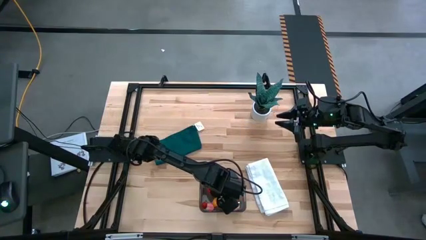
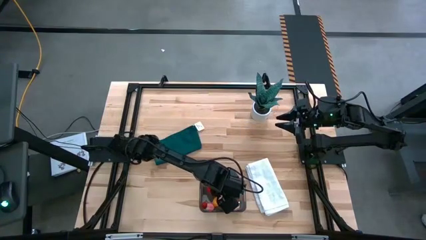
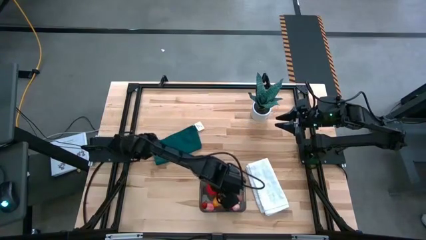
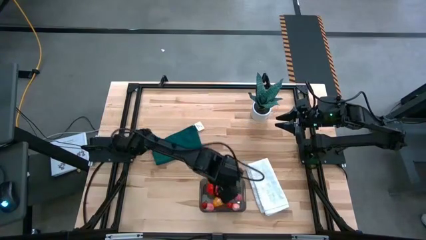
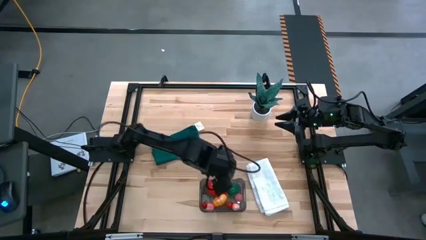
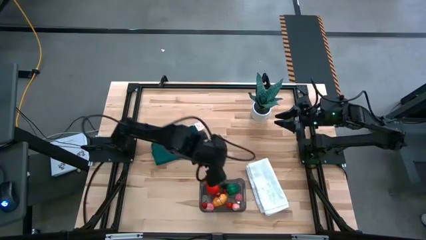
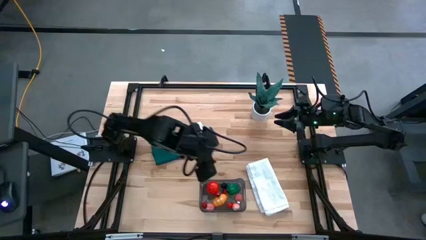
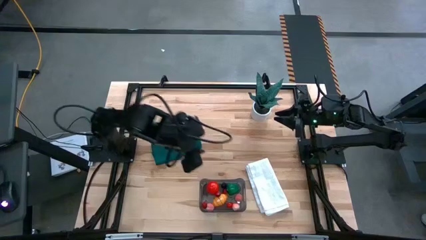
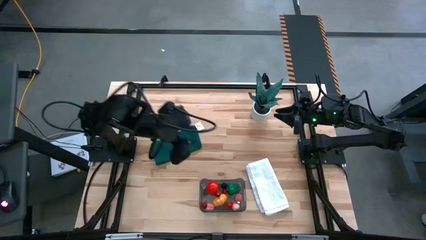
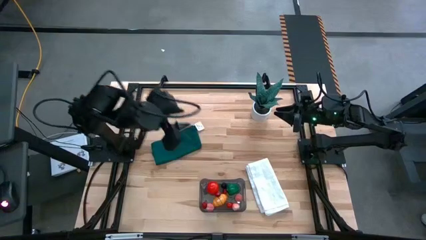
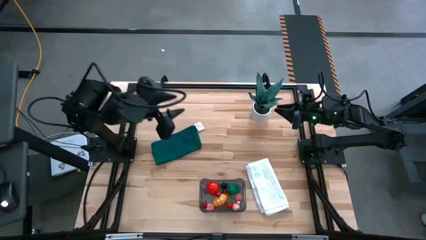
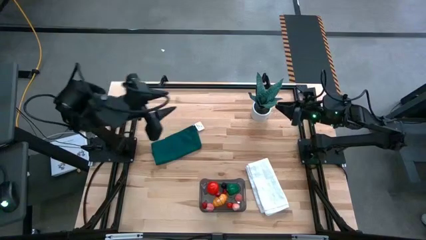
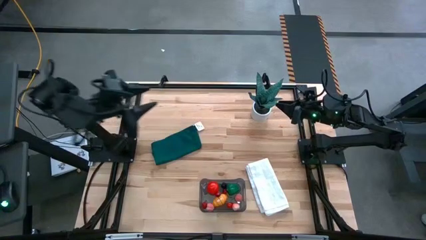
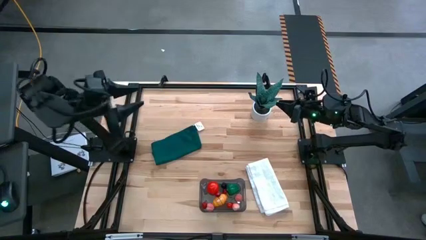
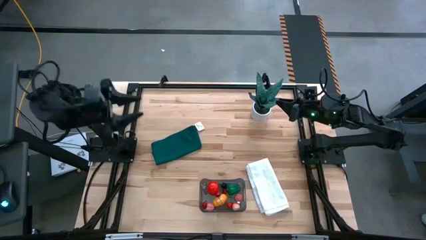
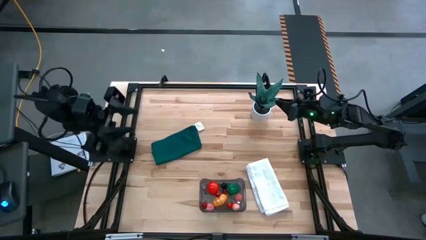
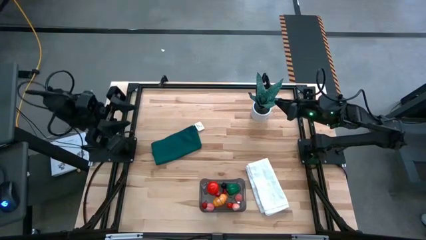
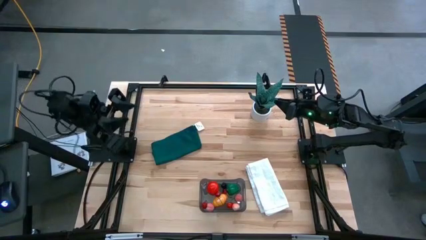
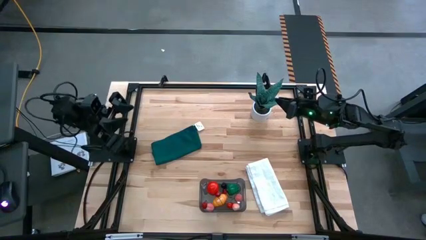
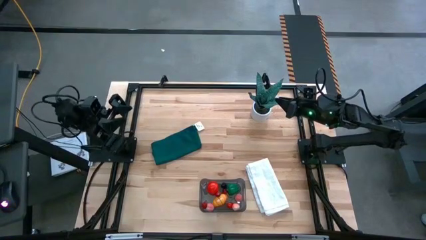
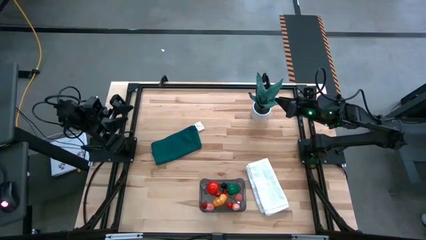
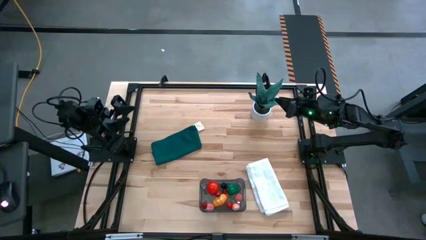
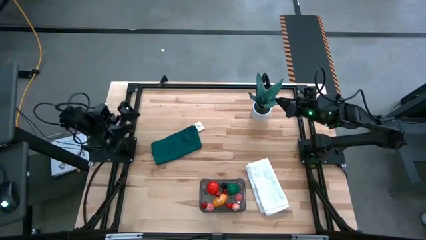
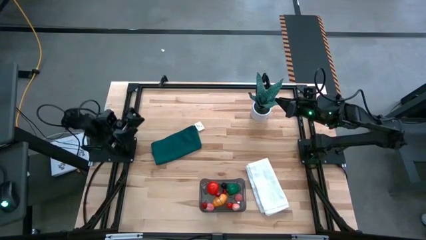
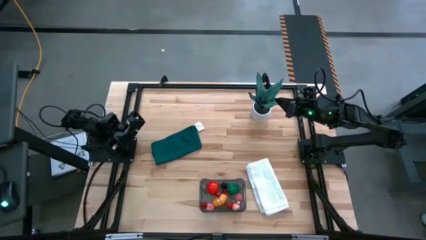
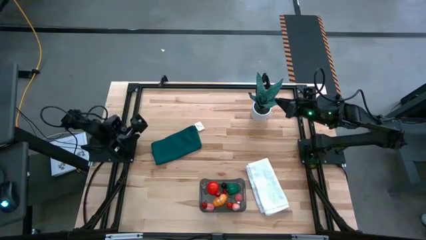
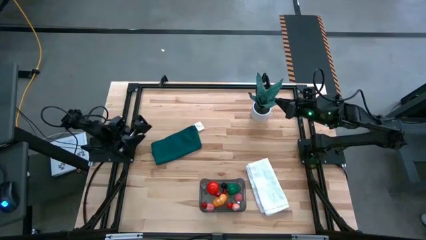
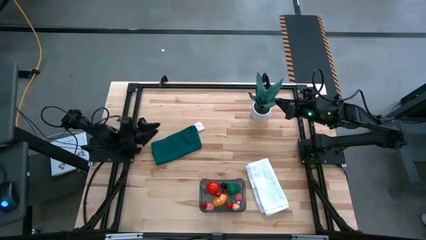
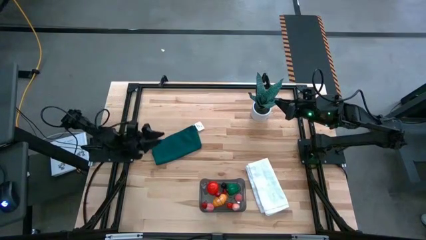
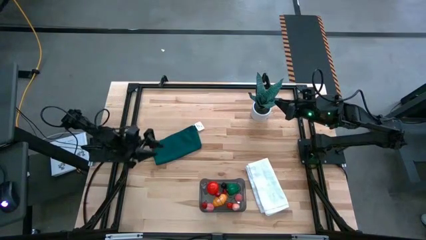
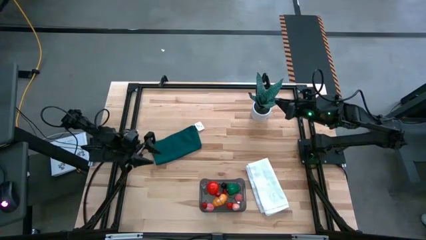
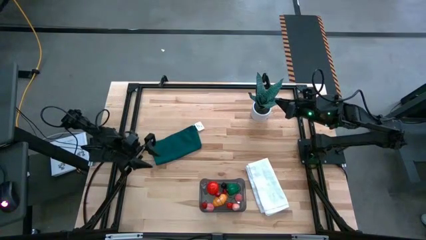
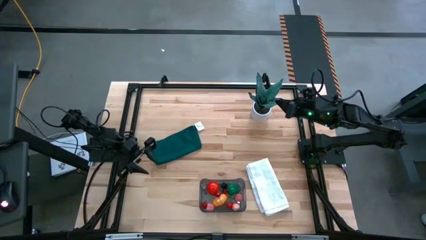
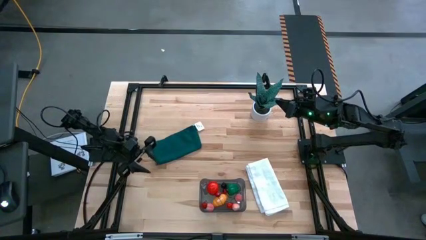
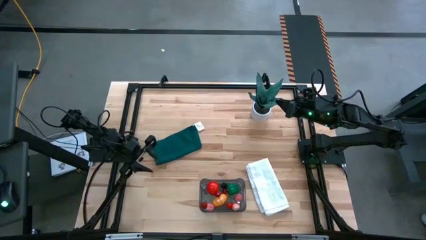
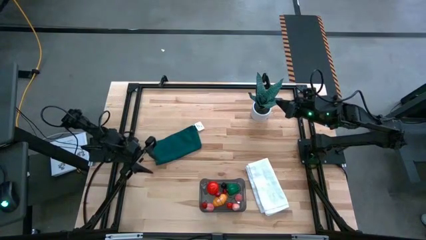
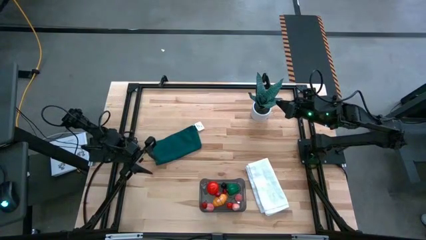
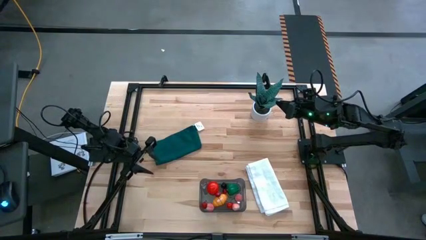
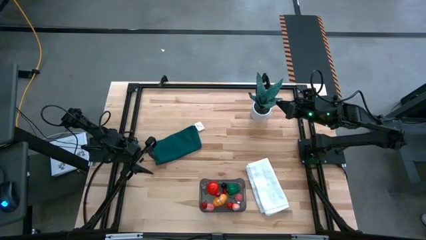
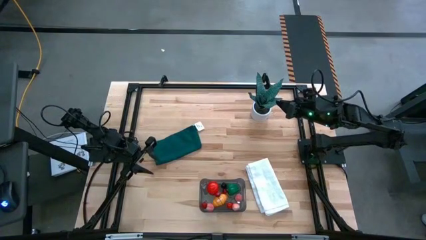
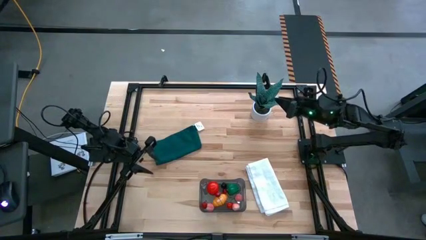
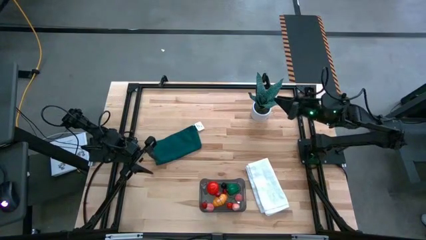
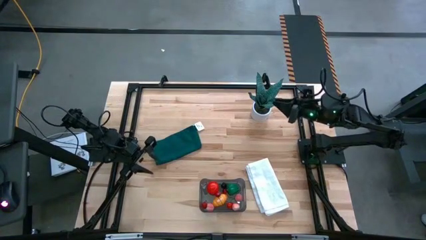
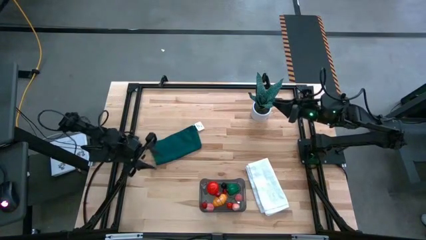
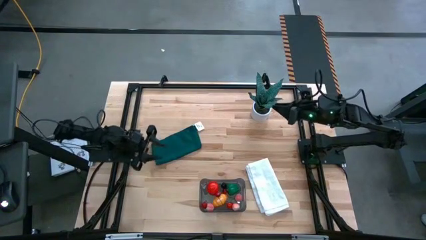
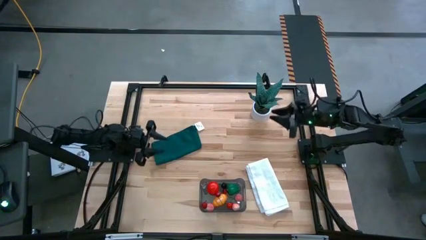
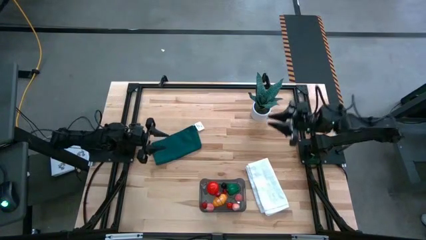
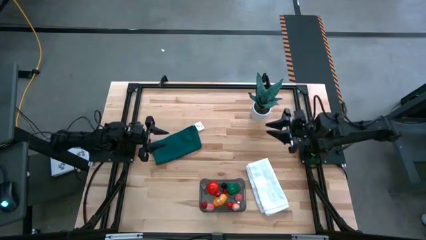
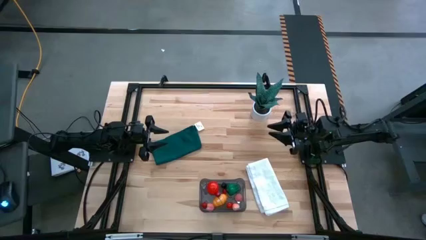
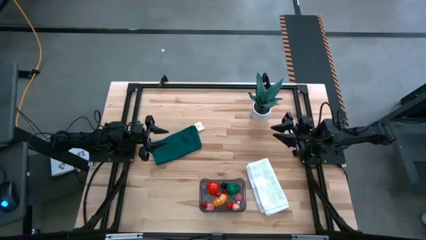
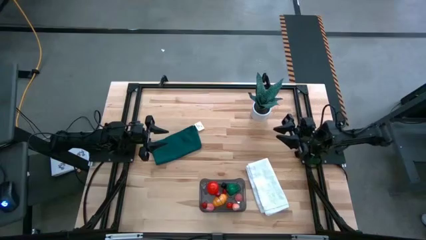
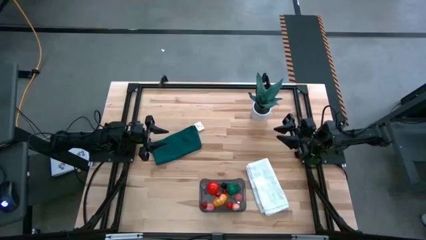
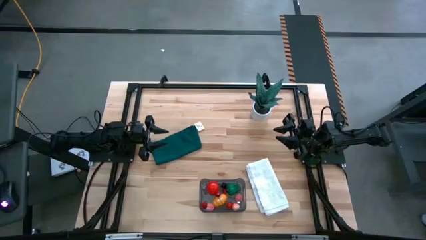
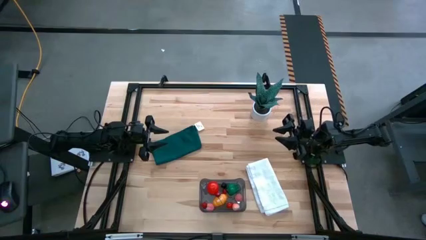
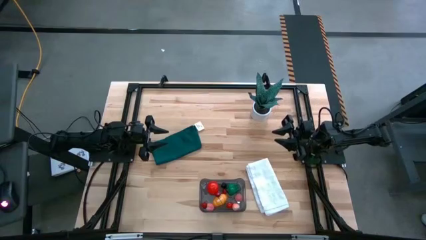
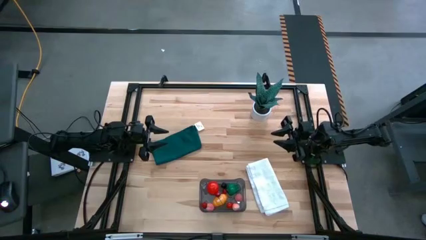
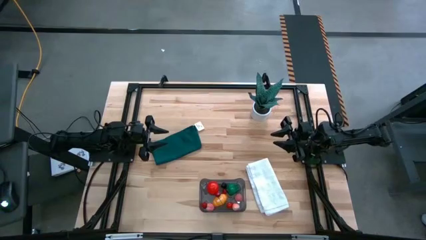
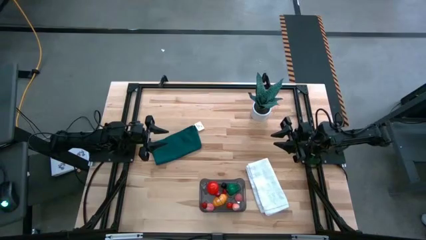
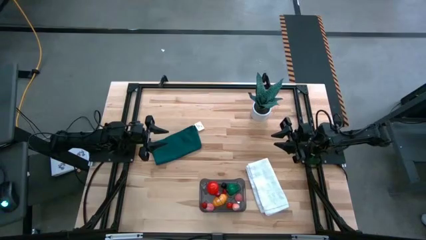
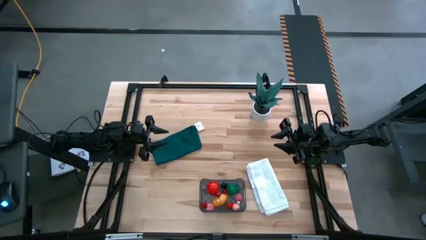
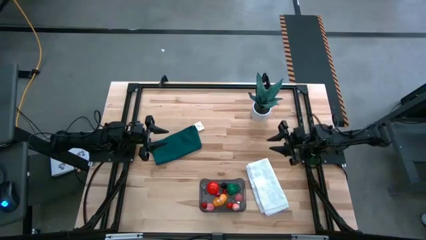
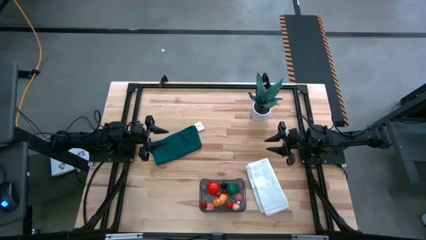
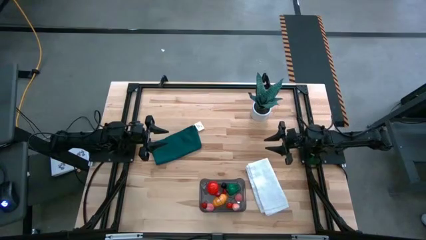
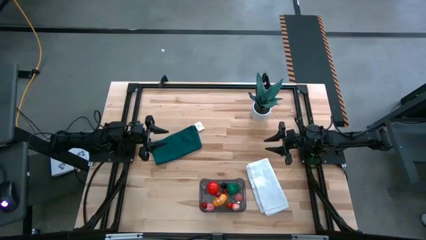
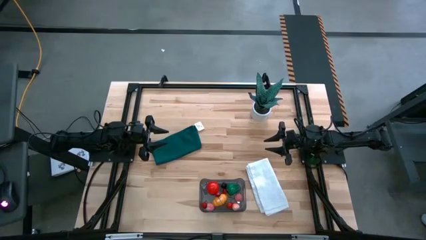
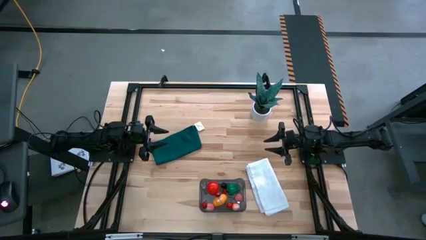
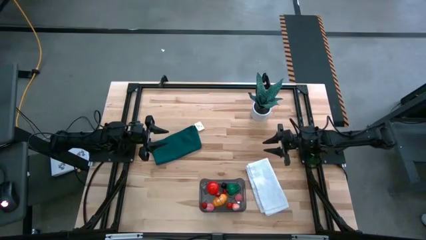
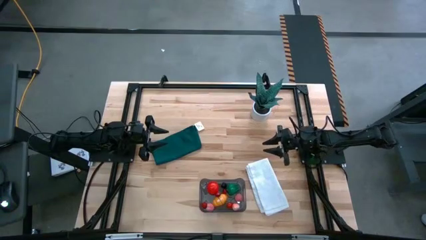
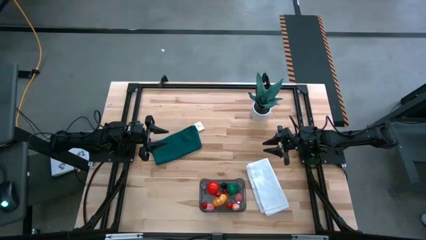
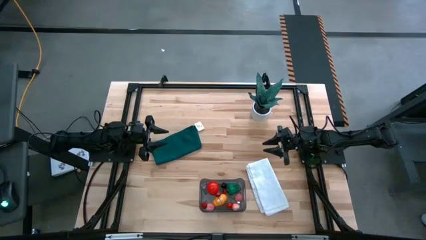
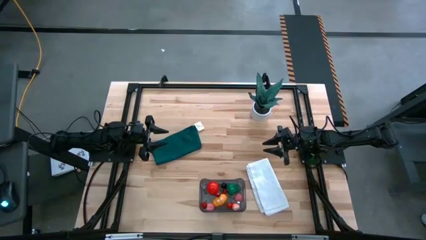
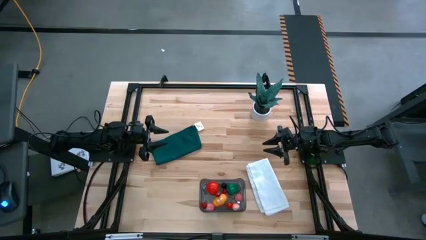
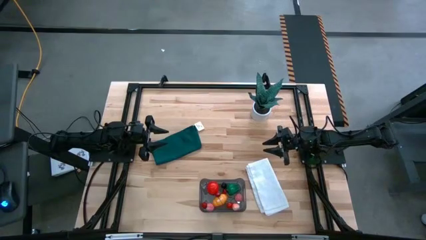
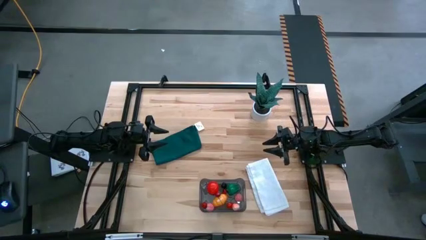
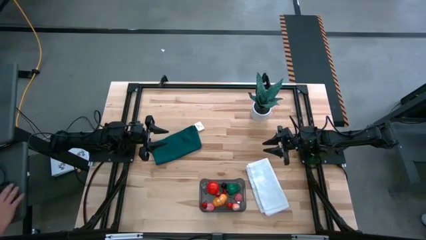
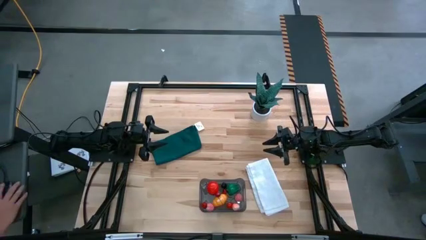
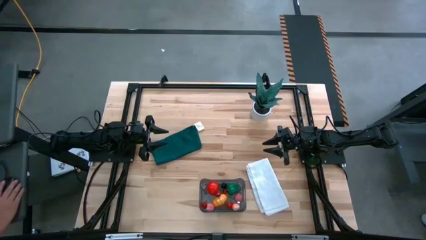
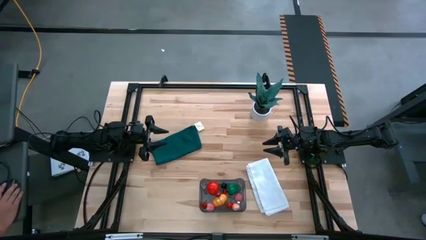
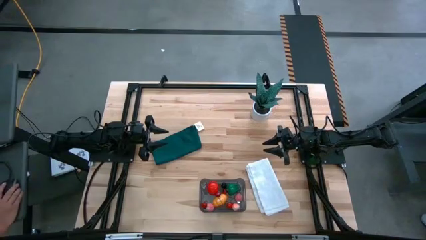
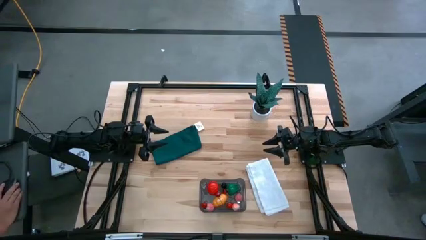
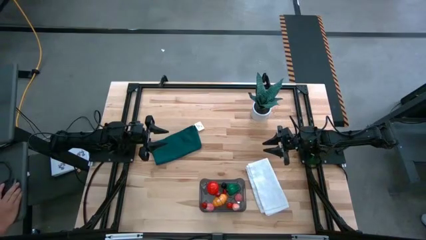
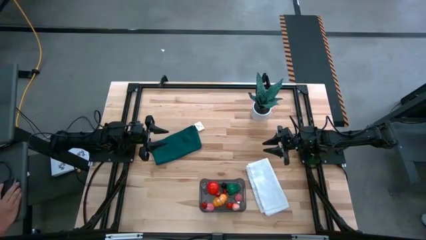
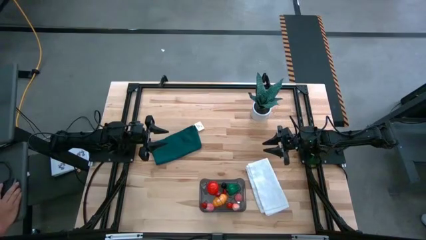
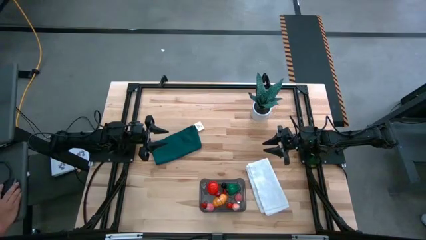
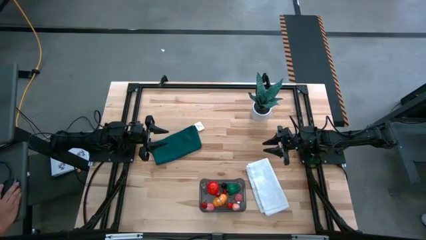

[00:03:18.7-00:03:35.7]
Task: Pick and placing Produce into tupperware
Return to Home Position
